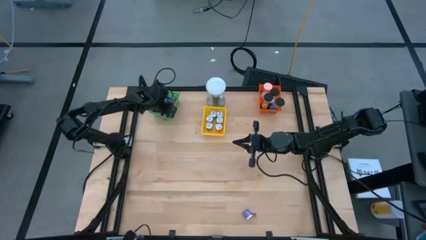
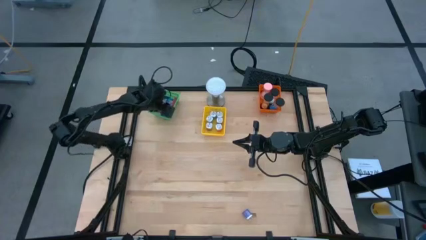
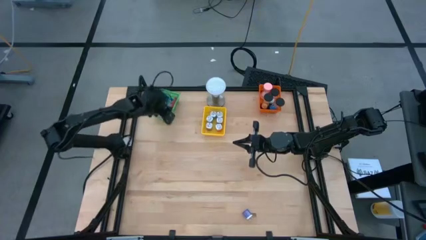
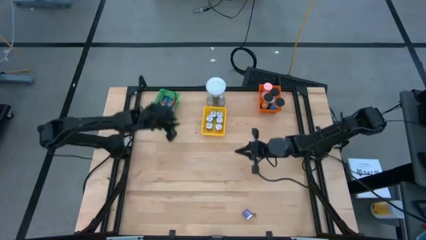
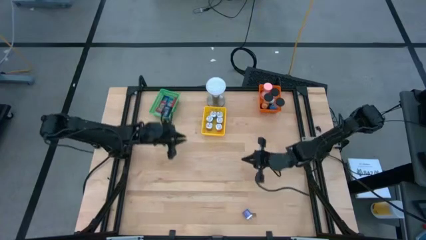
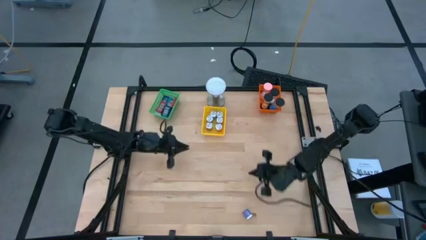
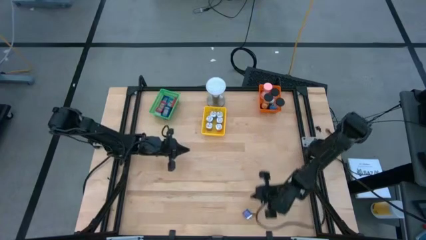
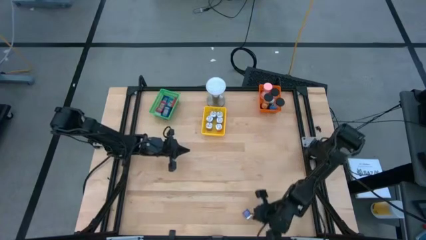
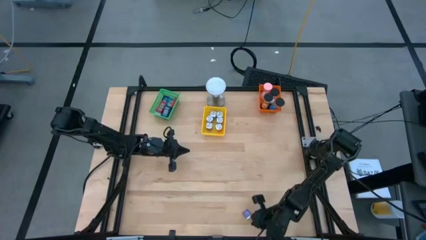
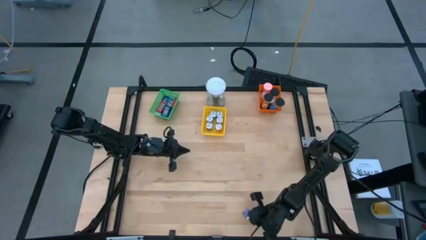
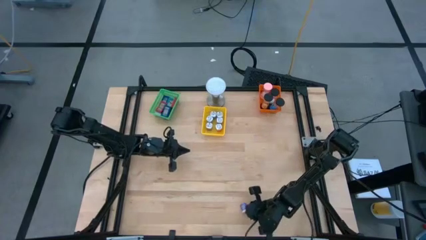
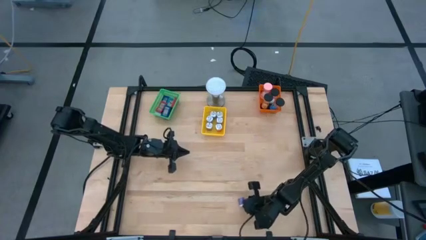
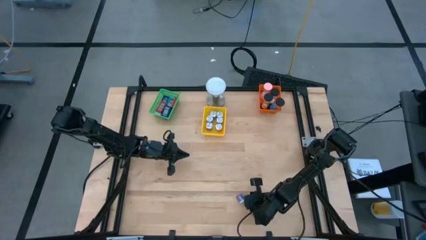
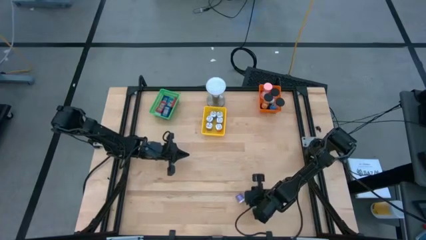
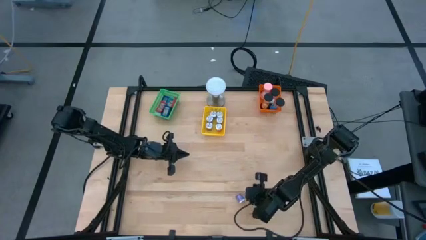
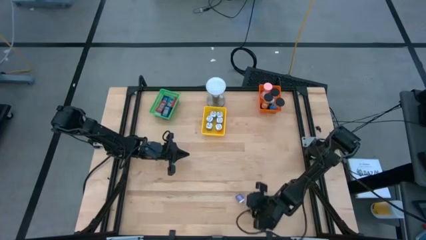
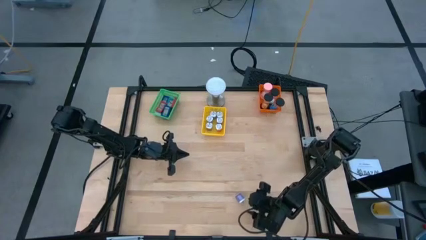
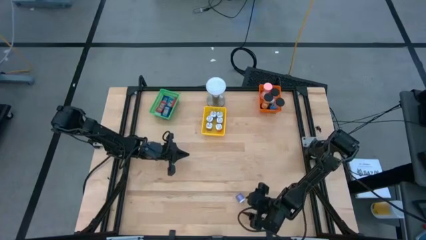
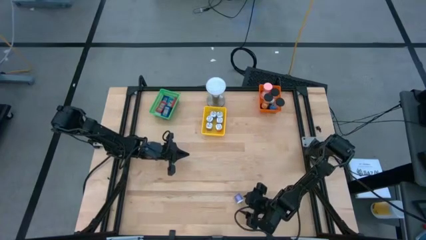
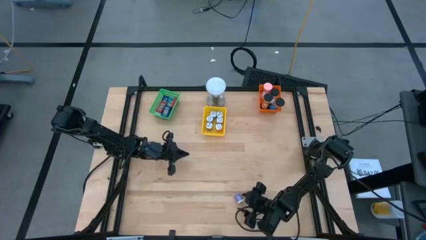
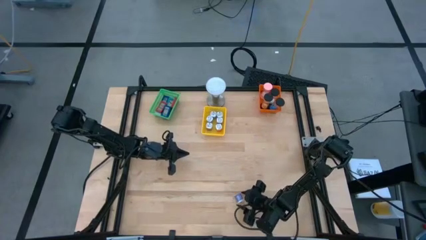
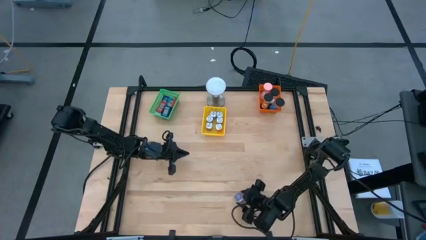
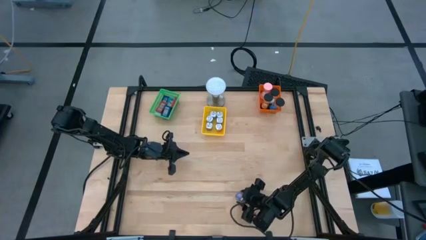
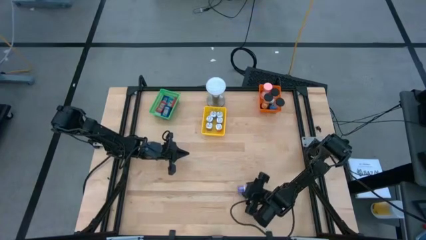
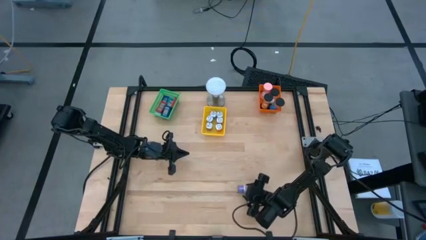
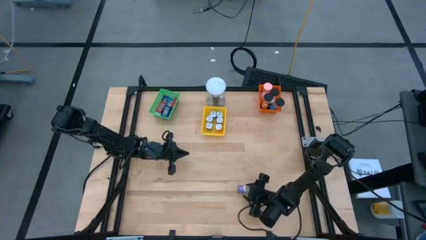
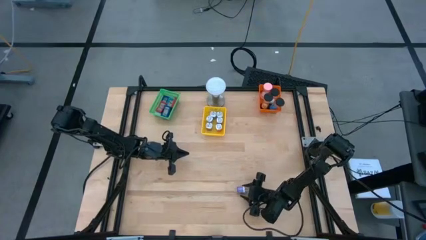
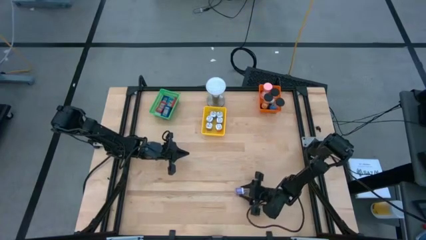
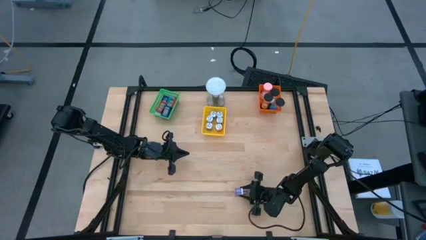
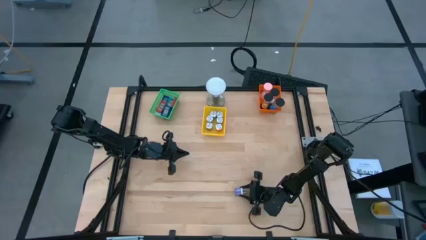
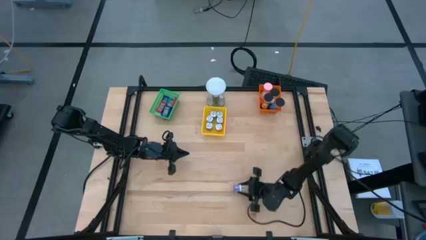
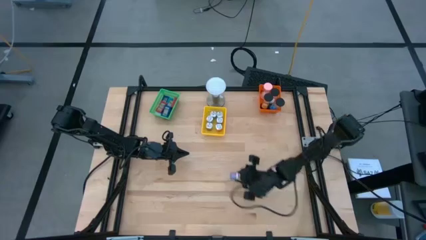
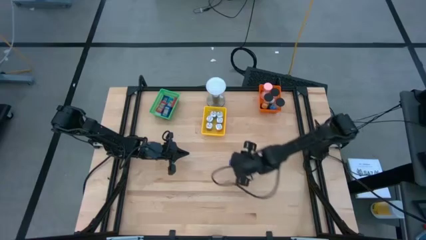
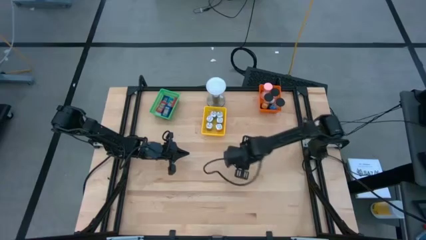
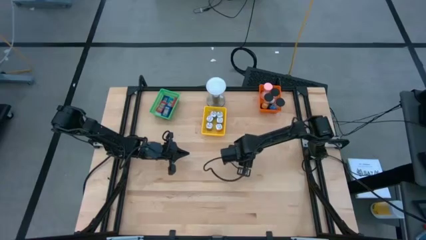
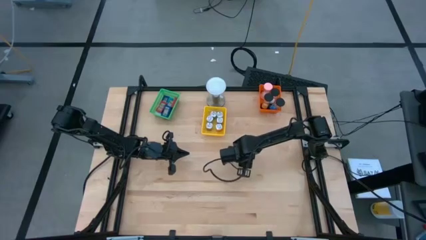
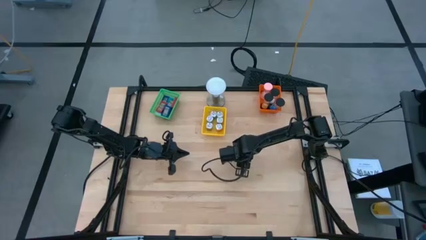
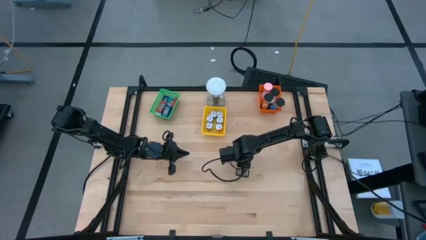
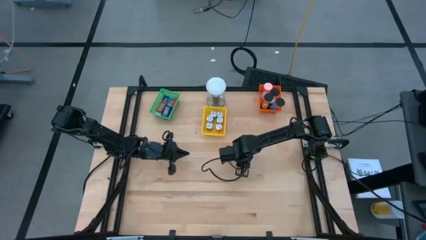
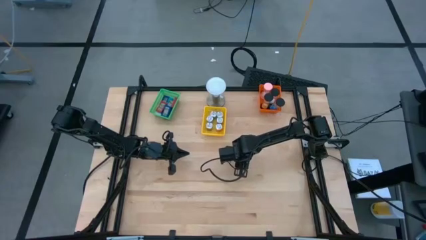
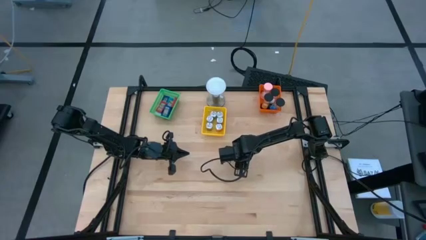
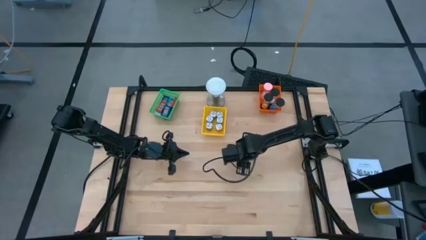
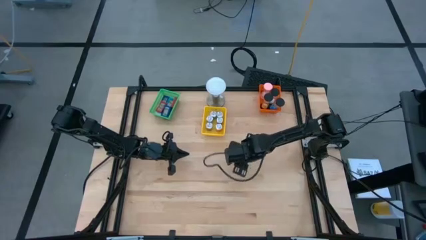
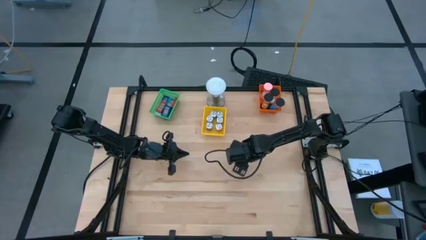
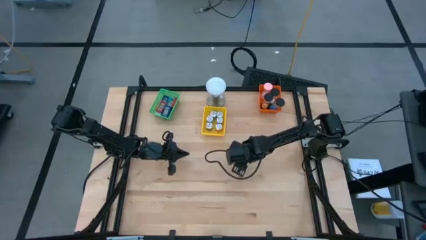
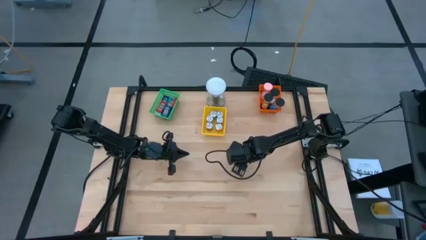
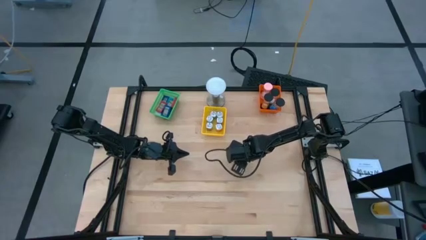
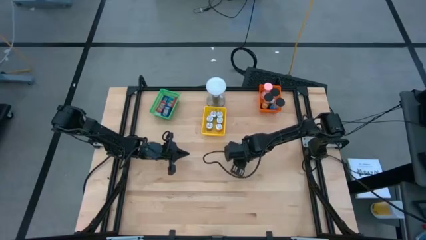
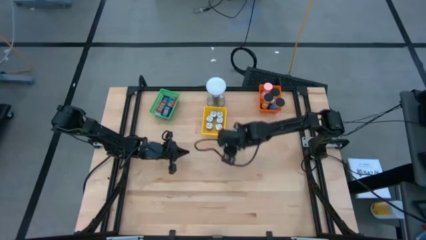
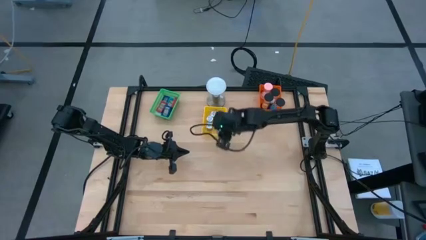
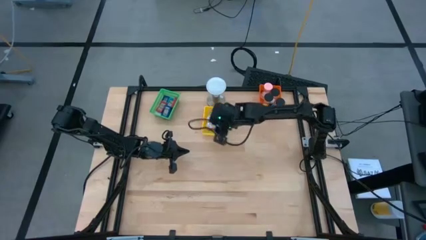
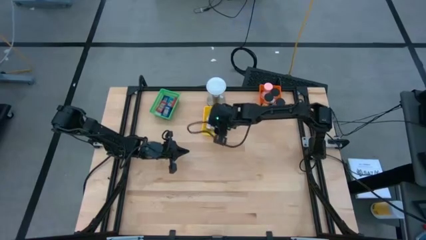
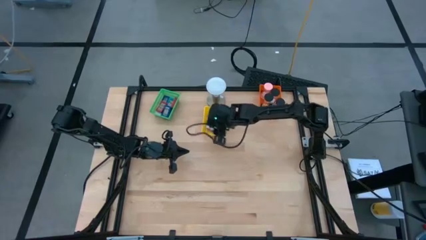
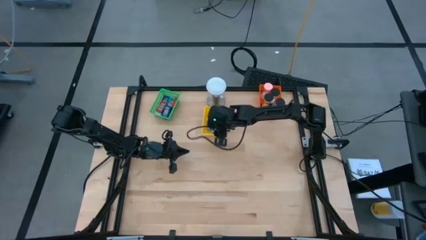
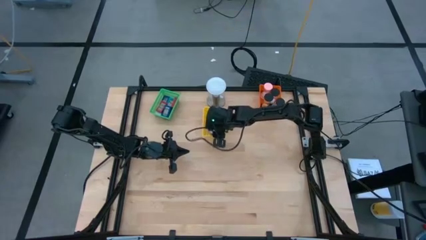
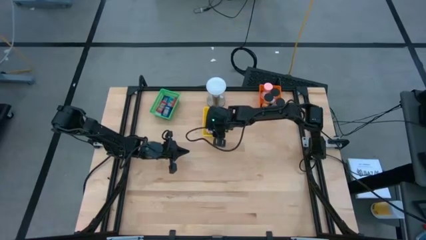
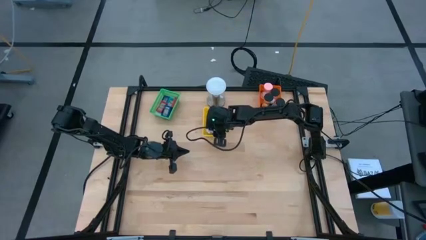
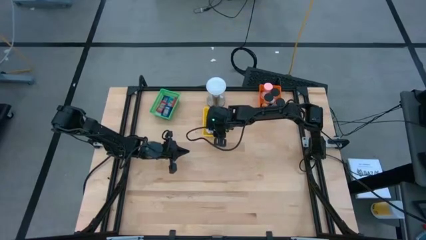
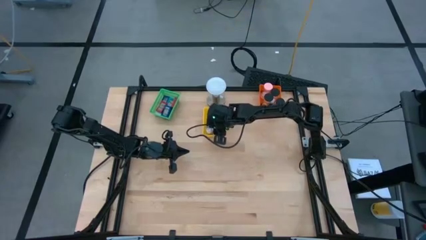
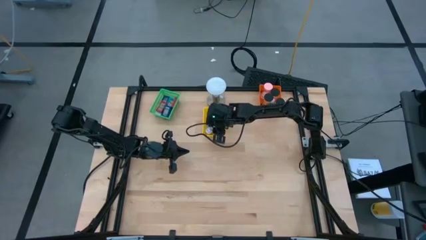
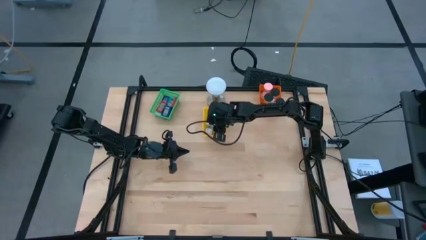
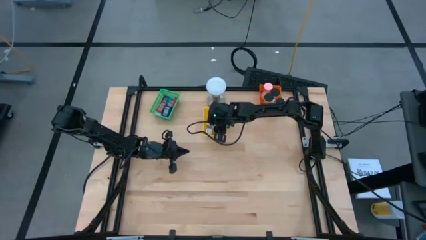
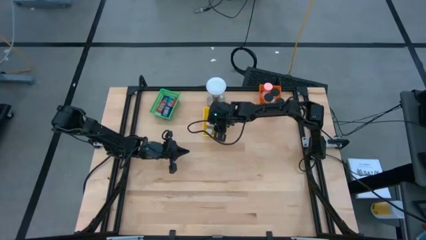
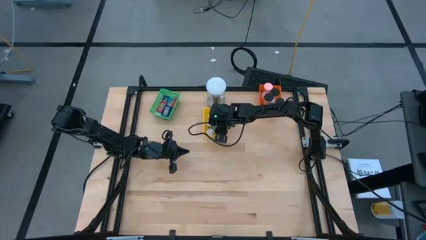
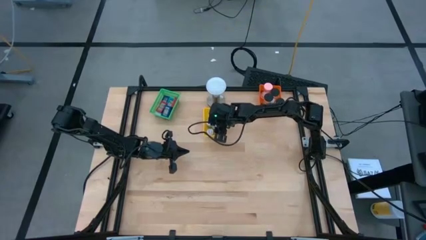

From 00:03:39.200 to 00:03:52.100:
Task: Pick & Place Office items
Put the purple charger adapter into the yellow bin

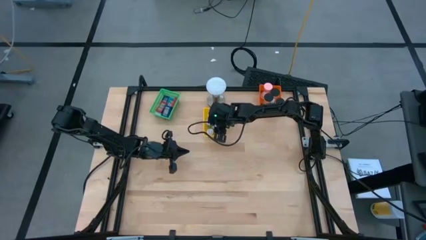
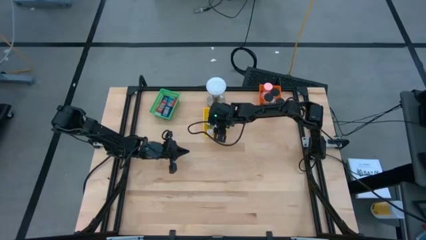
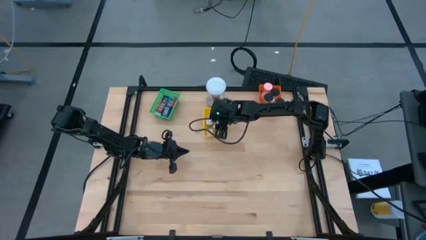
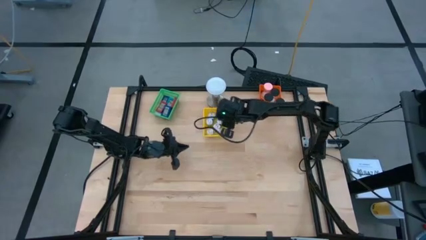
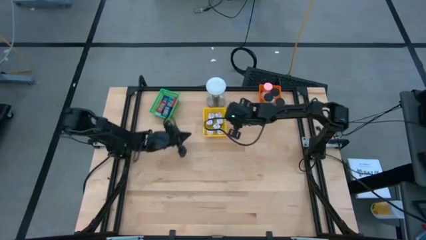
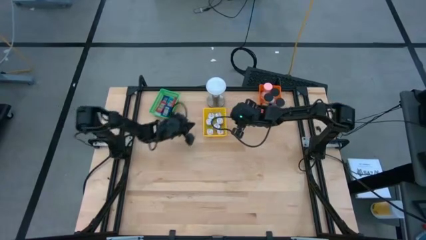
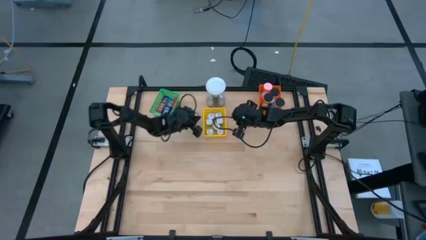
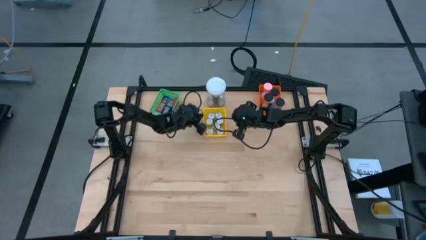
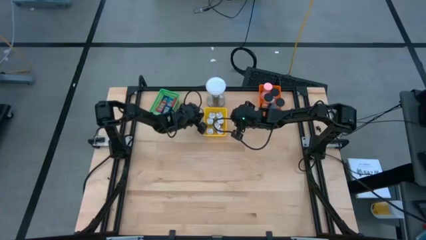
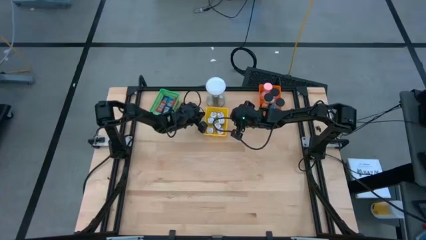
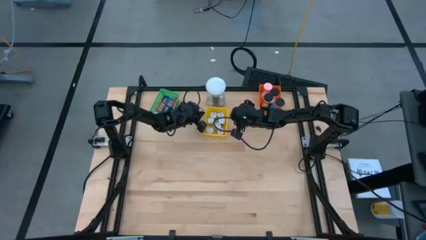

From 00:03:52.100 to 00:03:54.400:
Adjust the yellow bin

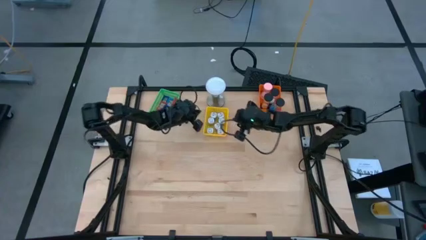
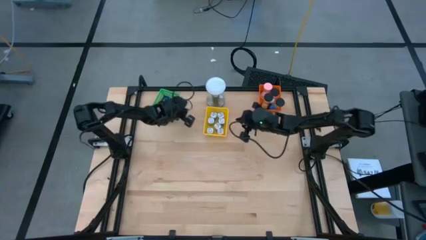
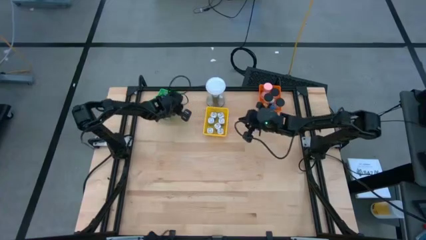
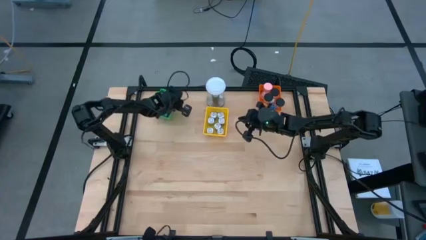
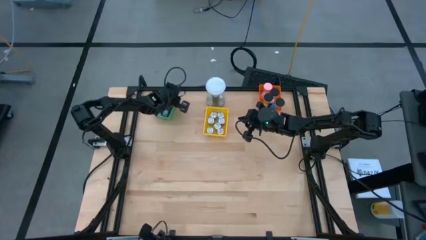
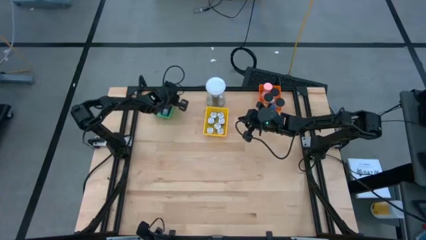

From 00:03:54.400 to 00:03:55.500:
Adjust the green bin
